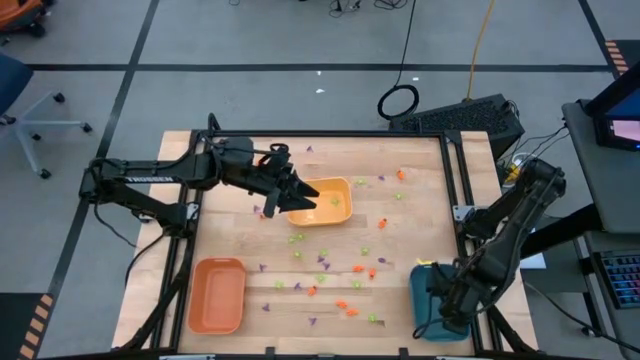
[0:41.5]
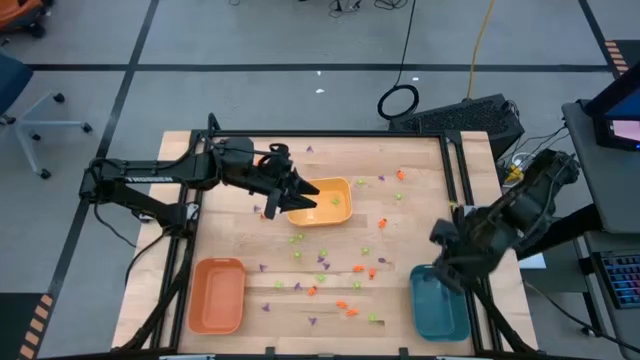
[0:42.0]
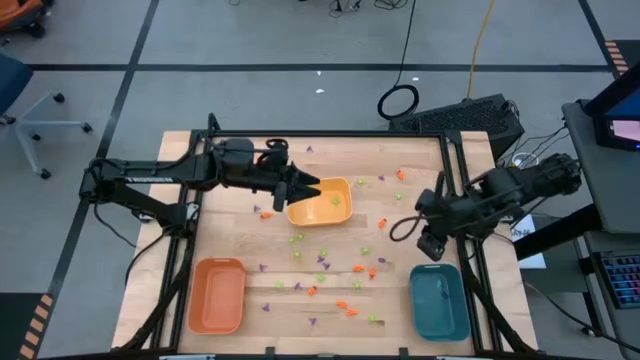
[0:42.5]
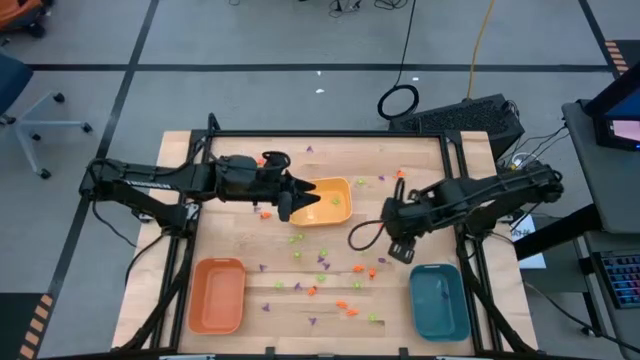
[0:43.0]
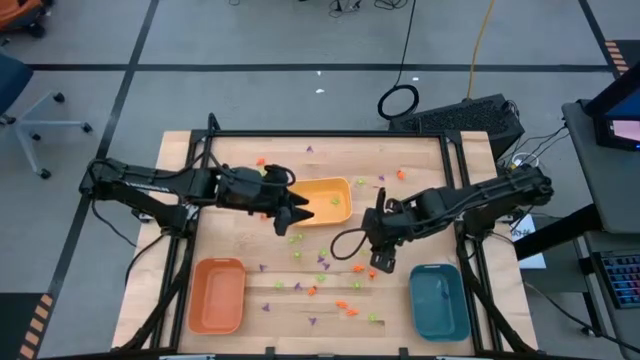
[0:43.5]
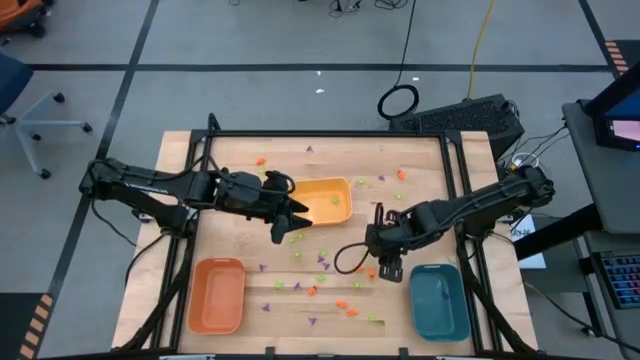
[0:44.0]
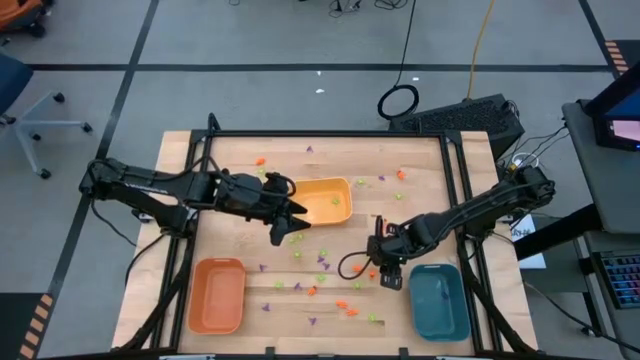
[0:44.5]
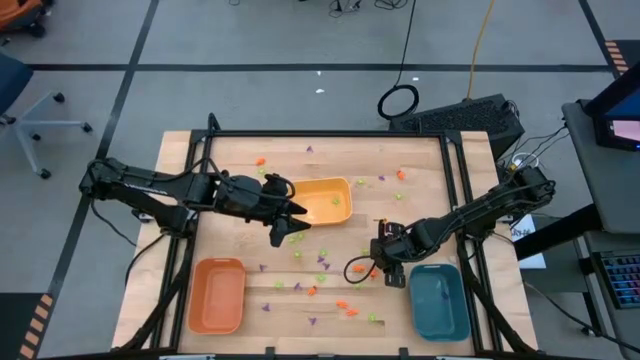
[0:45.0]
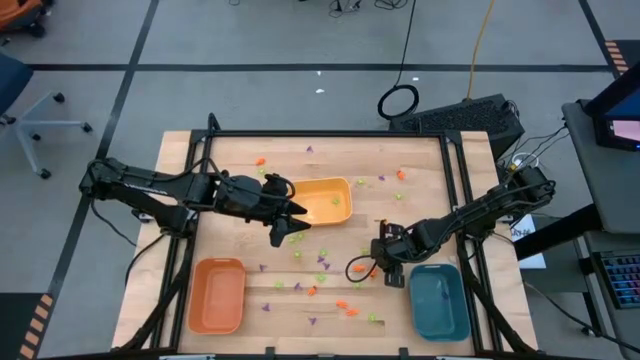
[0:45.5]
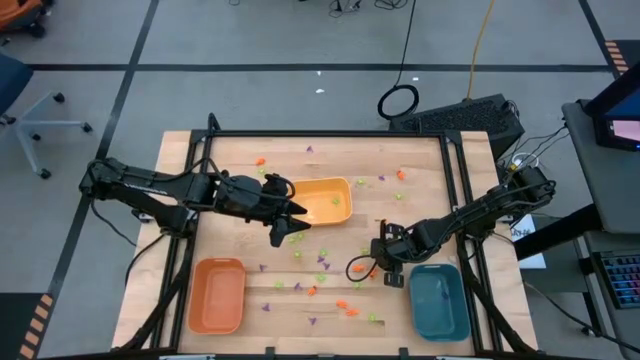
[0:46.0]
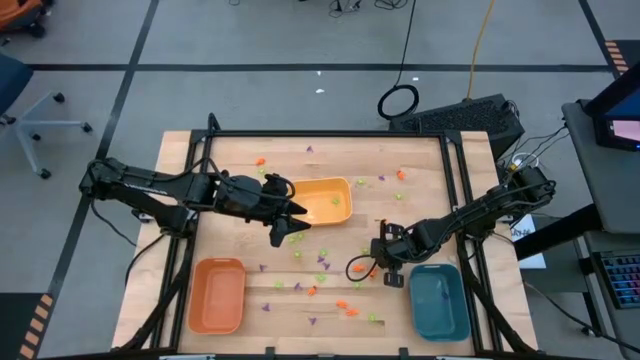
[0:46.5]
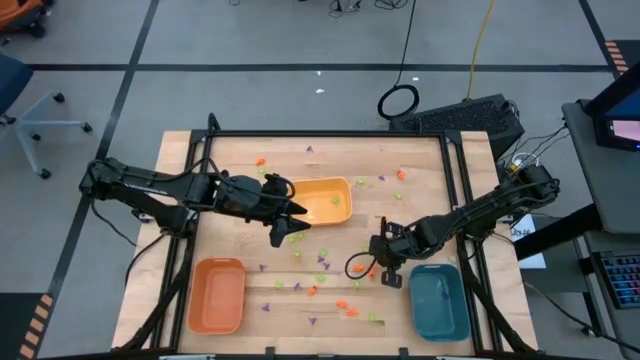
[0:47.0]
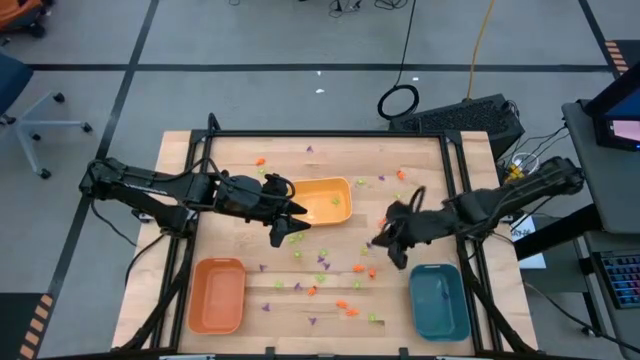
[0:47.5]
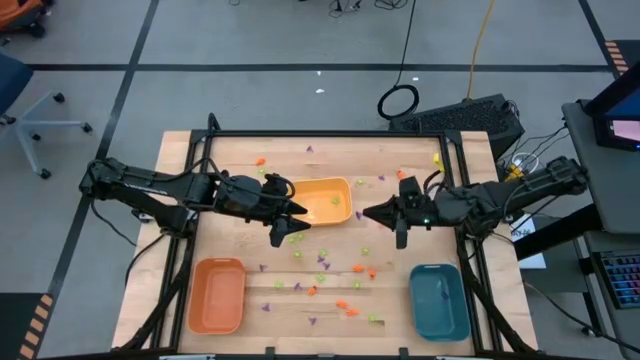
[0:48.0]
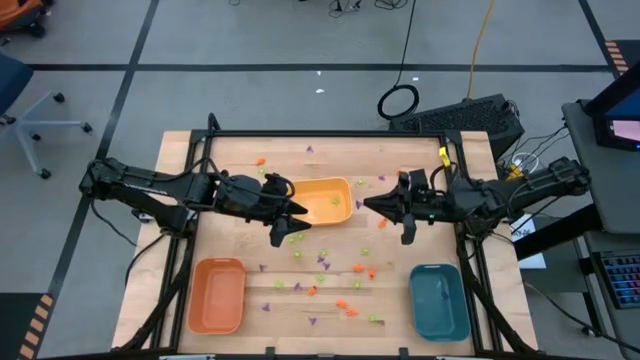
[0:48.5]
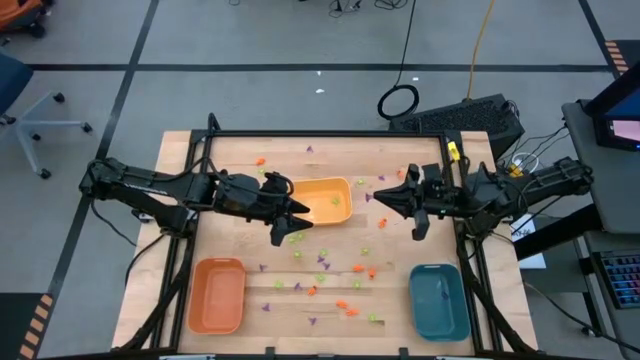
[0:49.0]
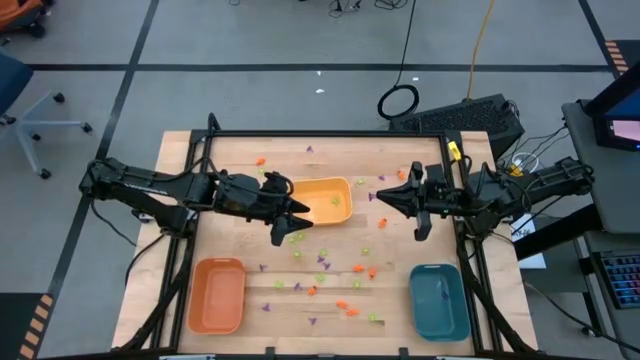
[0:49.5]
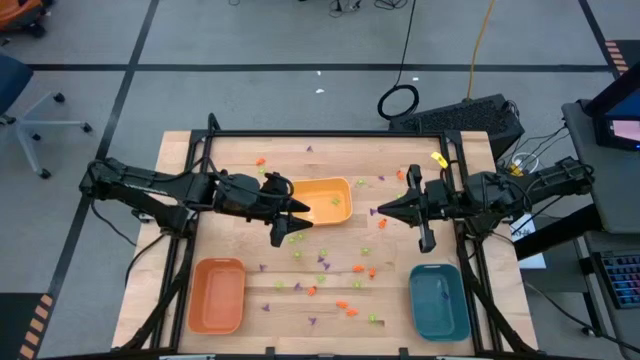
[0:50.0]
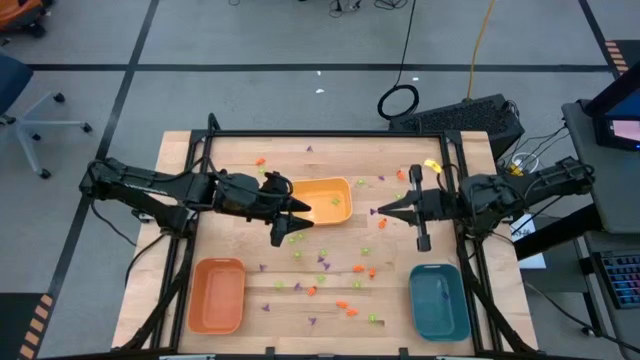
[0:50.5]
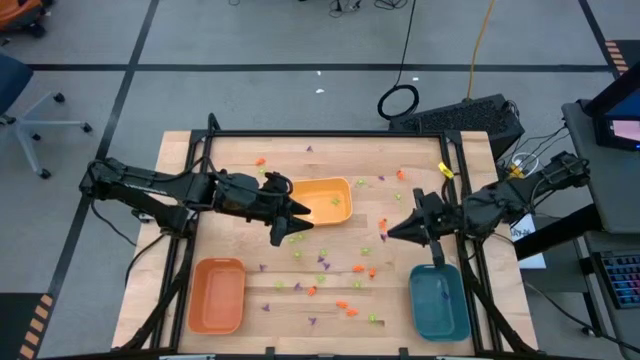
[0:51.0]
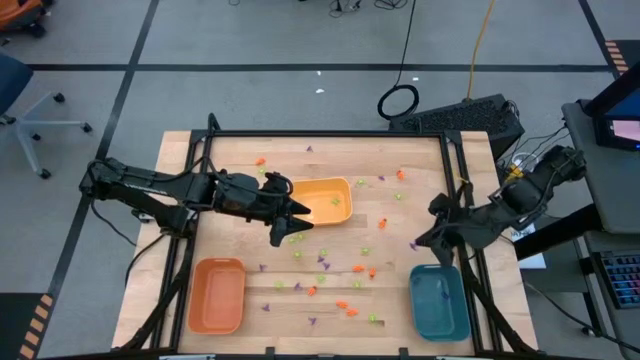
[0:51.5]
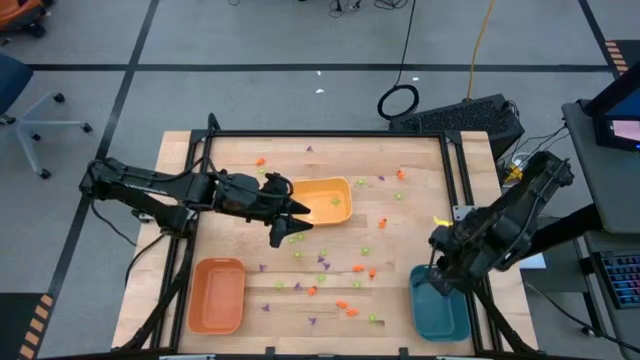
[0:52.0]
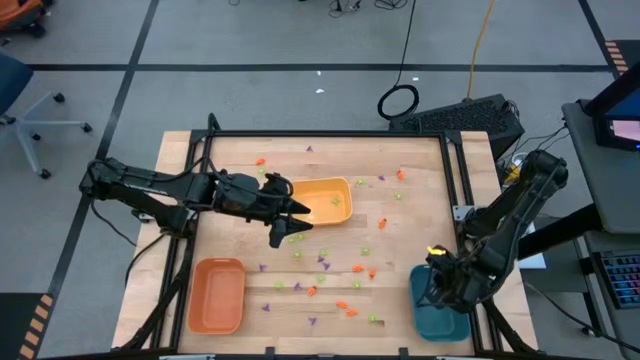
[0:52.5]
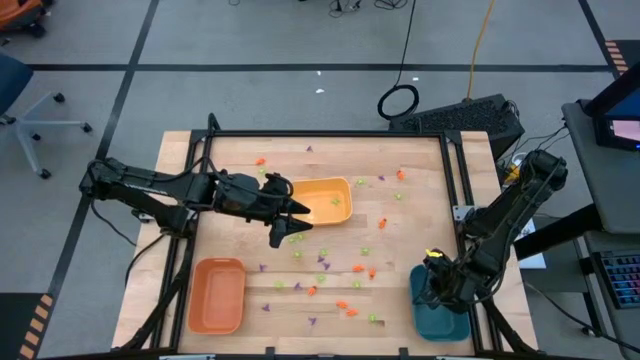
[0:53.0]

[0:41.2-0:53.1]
Task: Sort Halloween decoration
Put the violet witch hat toy into the blue bin

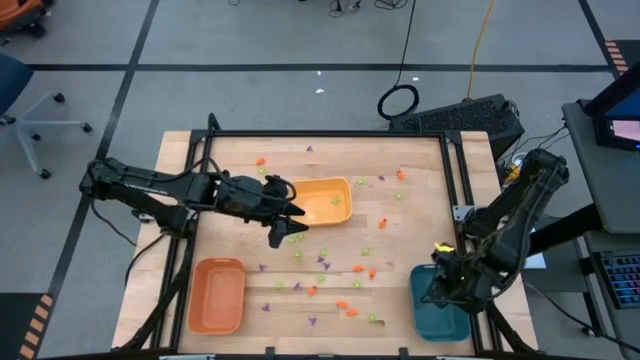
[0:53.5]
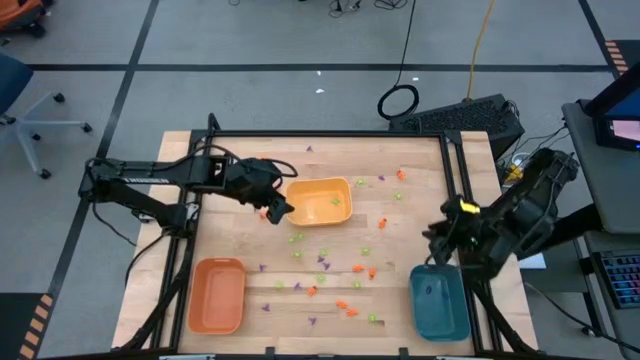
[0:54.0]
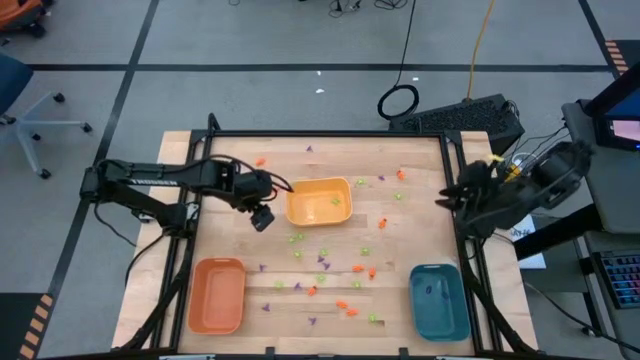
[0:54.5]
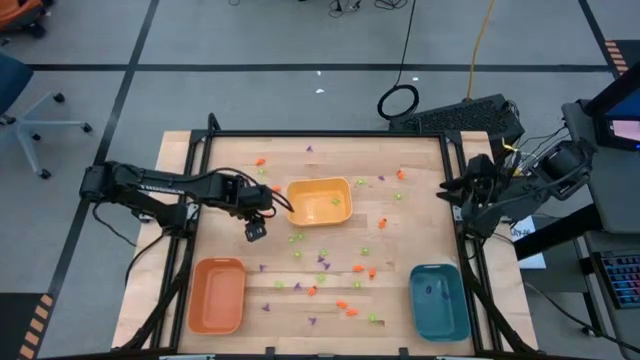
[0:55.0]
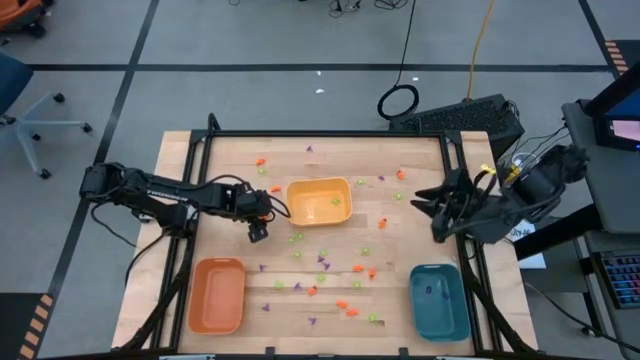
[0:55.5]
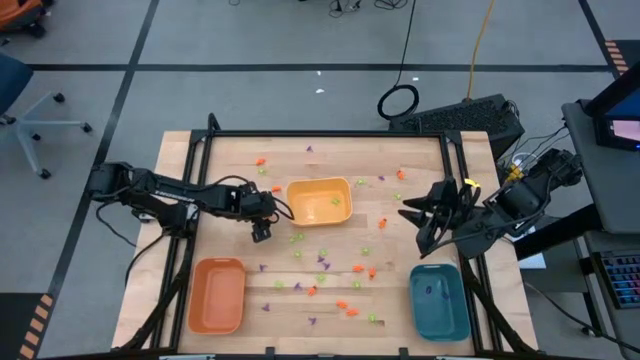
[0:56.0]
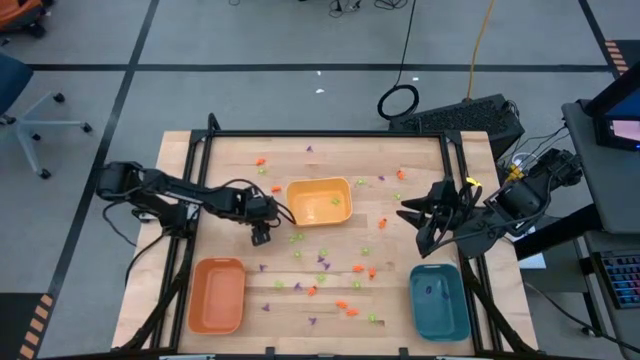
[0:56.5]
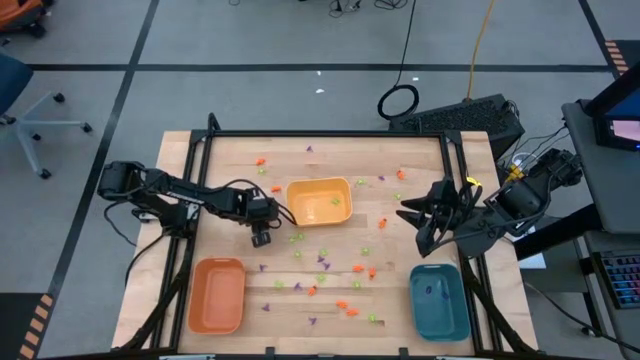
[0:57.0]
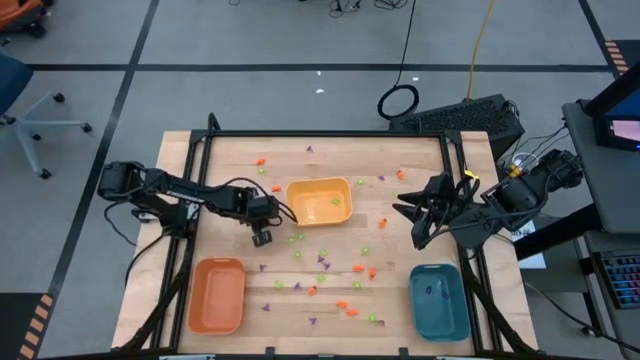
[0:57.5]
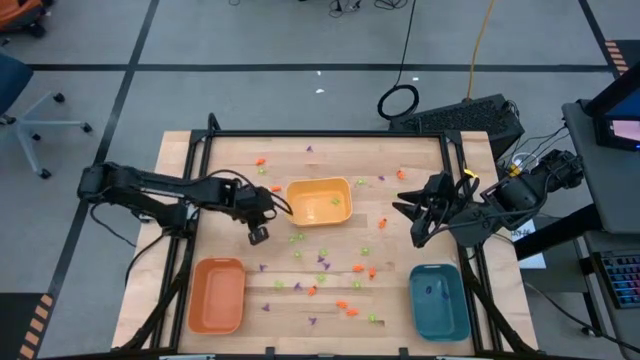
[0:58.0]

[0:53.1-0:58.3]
Put the orange skeleton toy into the orange bin

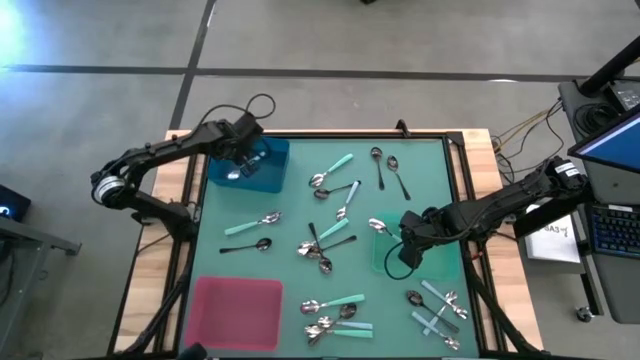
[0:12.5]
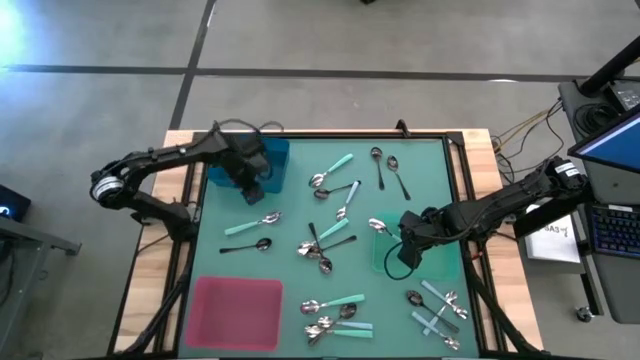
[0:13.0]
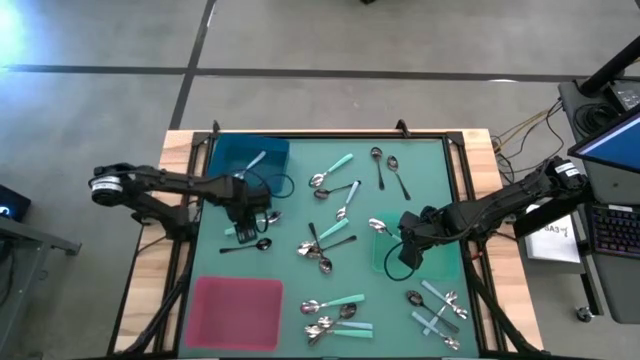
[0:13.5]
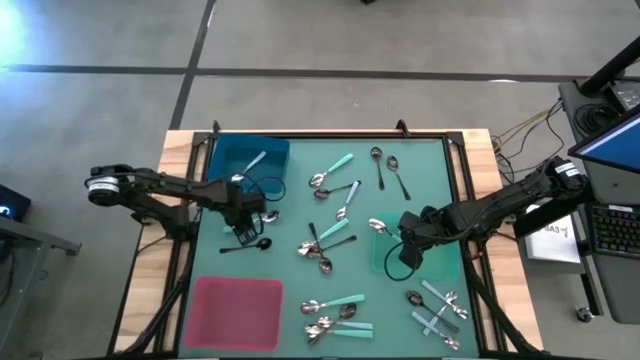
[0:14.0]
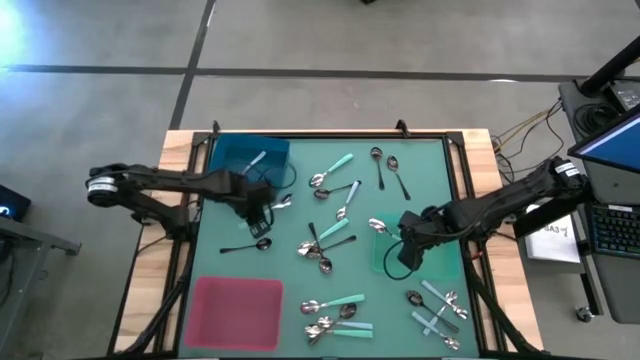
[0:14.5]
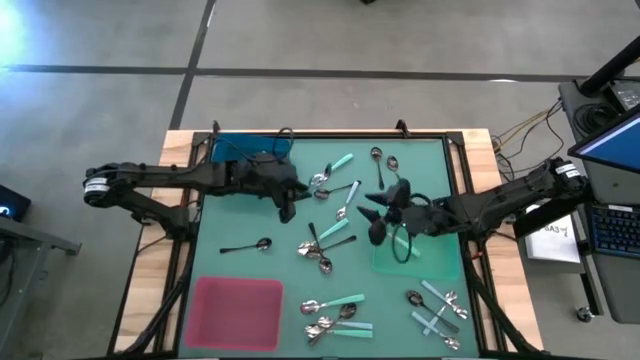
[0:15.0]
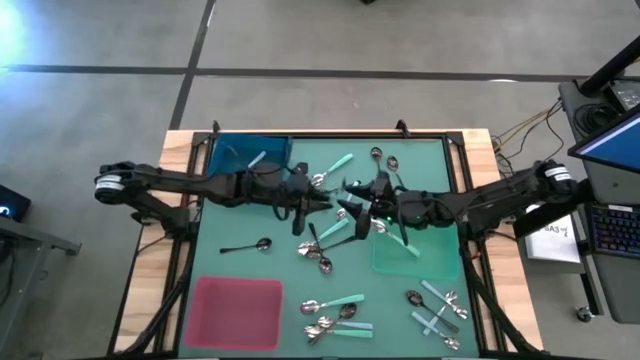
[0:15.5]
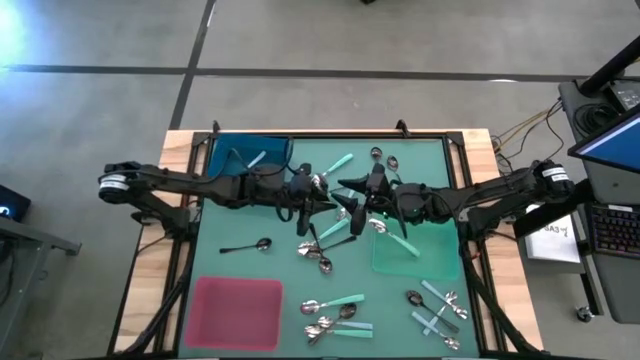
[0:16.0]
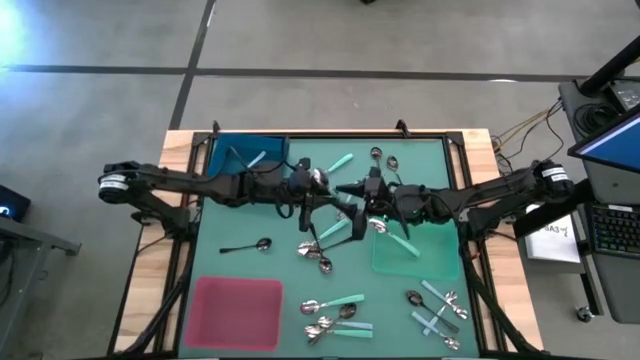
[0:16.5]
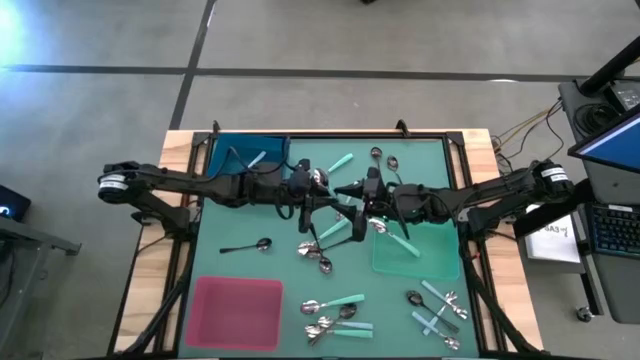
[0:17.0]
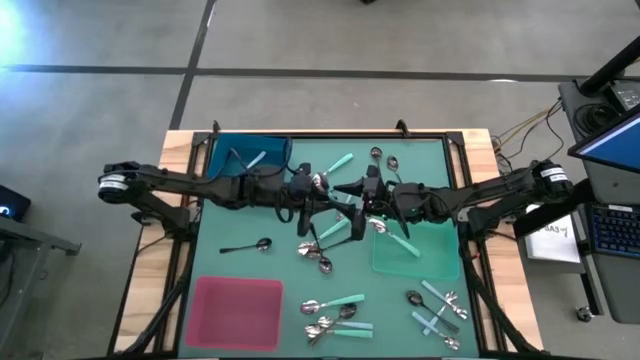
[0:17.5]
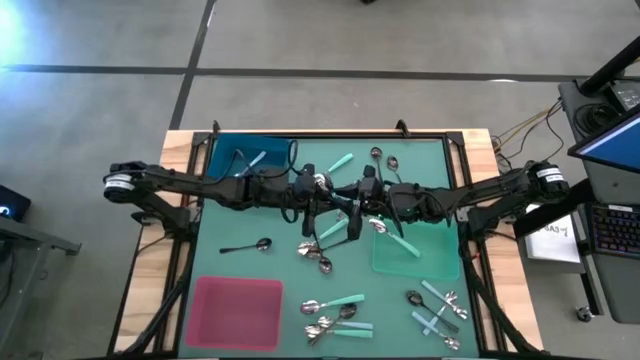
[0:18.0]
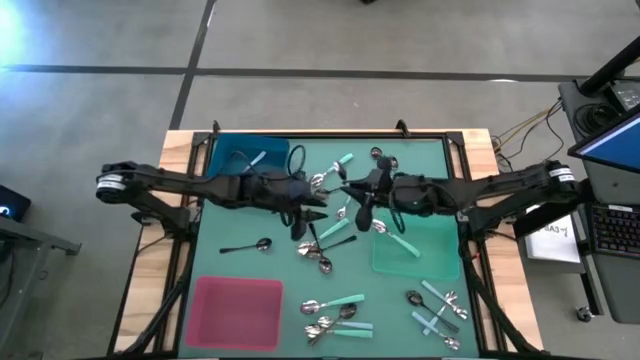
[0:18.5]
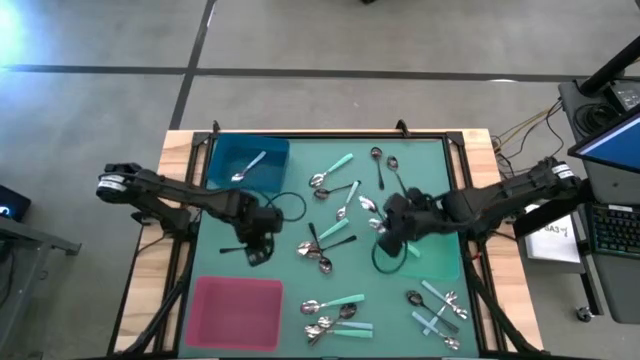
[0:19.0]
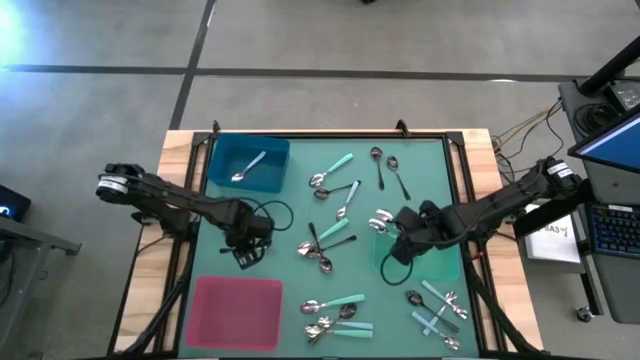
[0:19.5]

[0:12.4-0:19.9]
Task: Sort silverware by color (type)
Put the green spoon into the green bin
